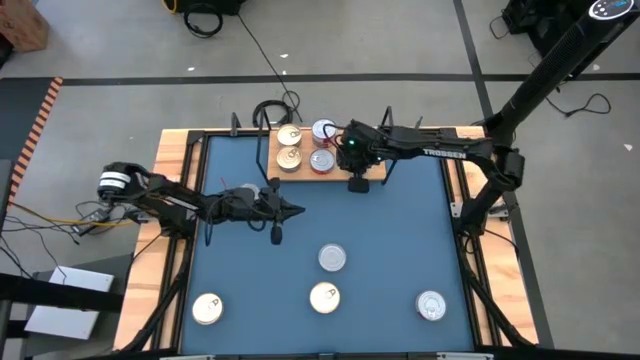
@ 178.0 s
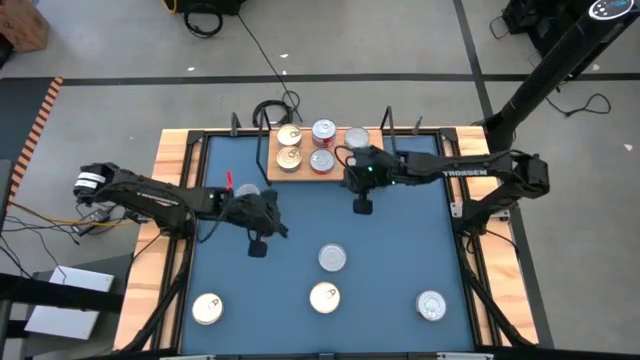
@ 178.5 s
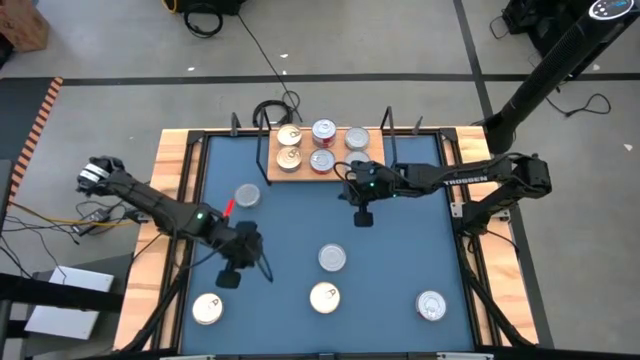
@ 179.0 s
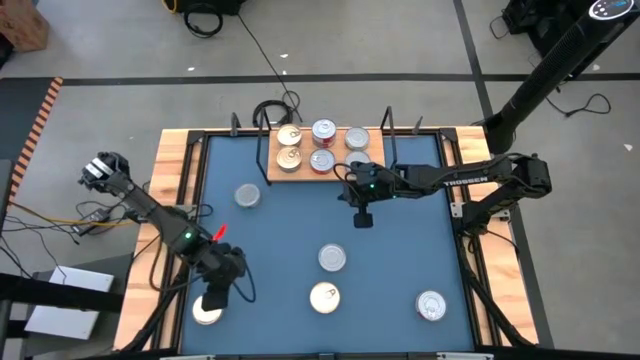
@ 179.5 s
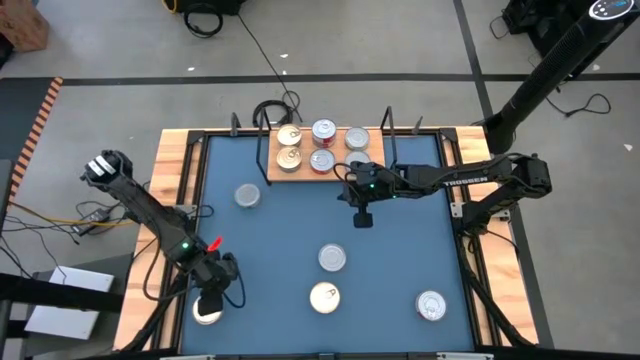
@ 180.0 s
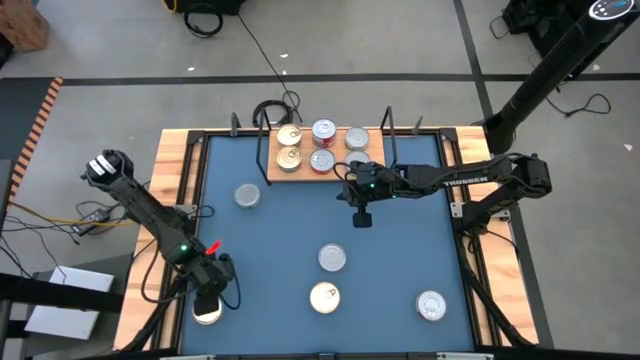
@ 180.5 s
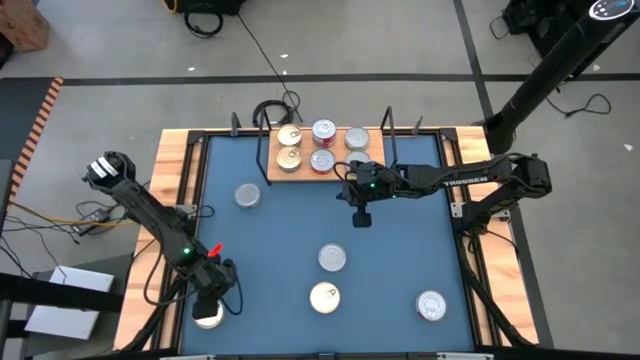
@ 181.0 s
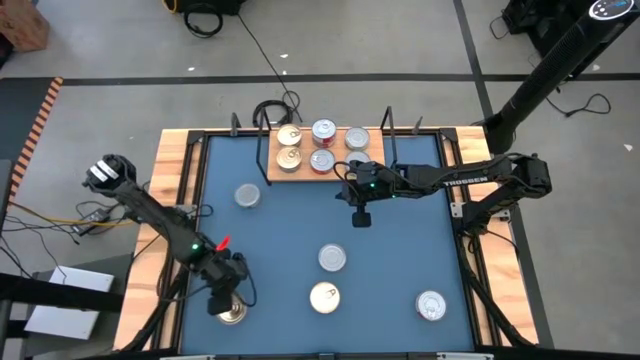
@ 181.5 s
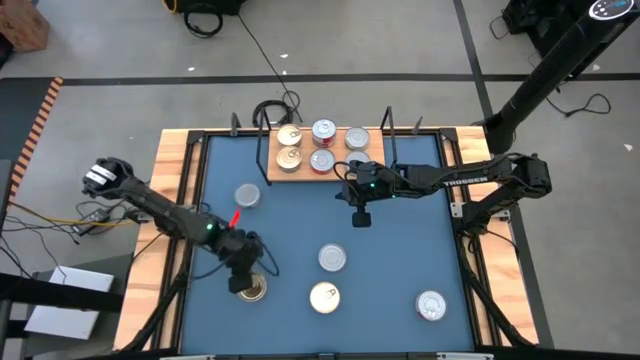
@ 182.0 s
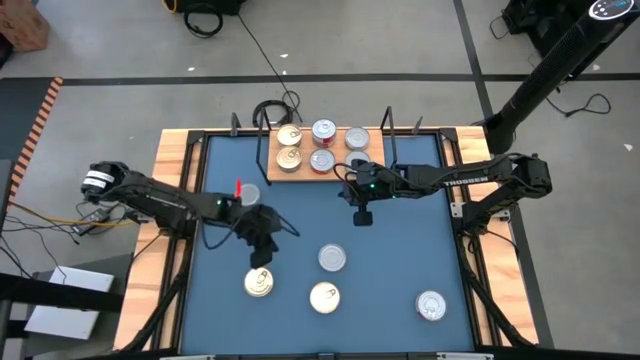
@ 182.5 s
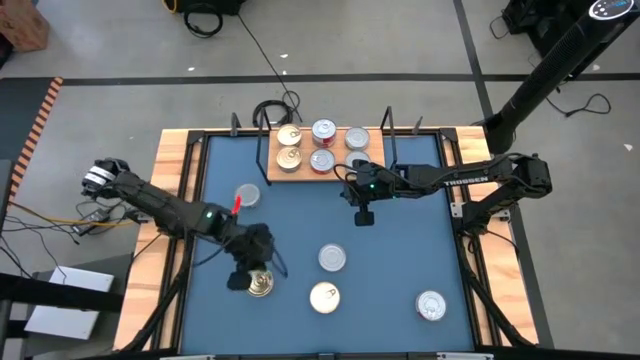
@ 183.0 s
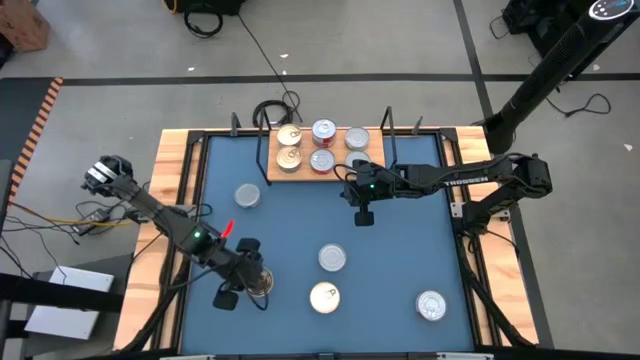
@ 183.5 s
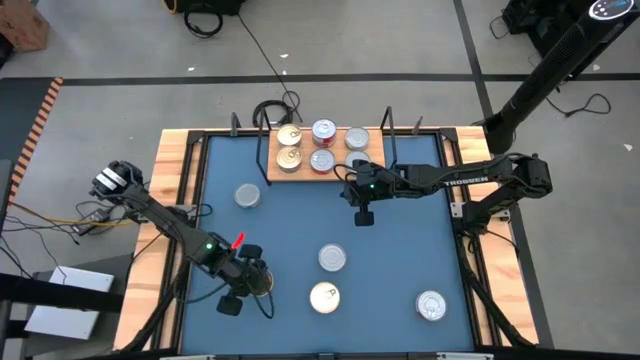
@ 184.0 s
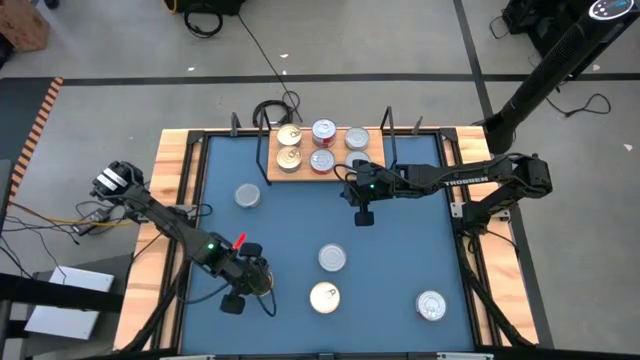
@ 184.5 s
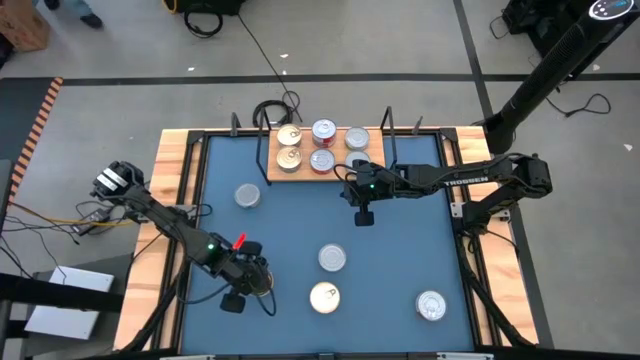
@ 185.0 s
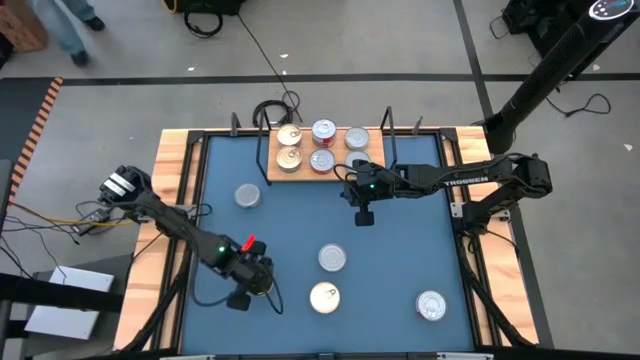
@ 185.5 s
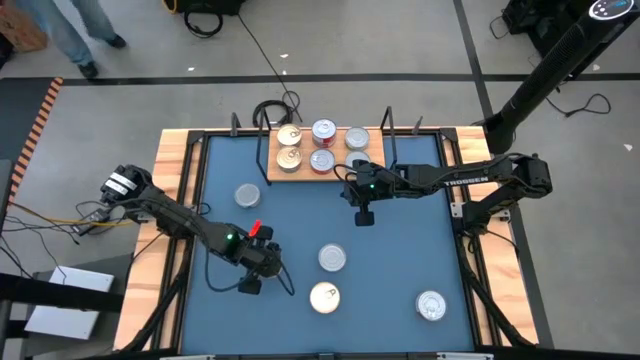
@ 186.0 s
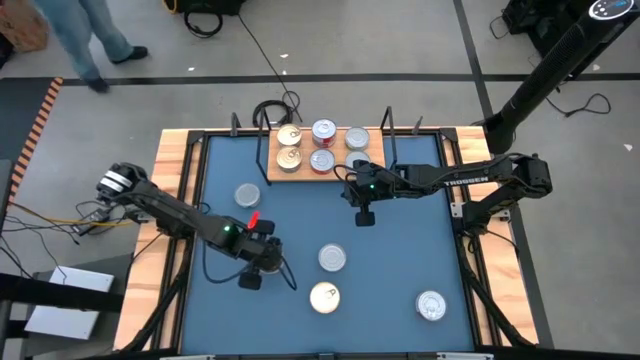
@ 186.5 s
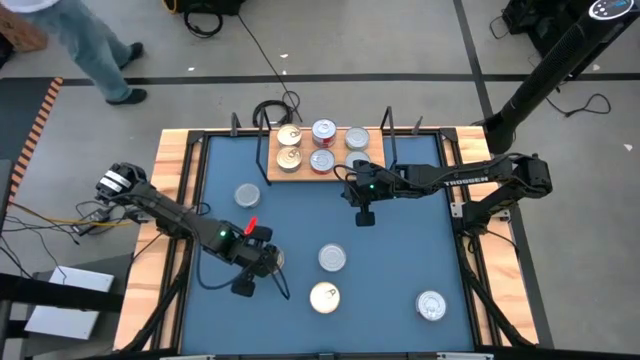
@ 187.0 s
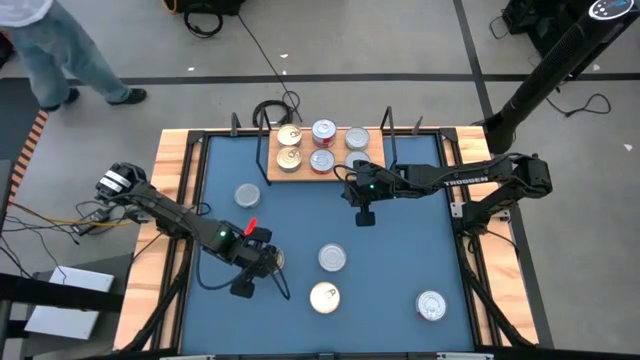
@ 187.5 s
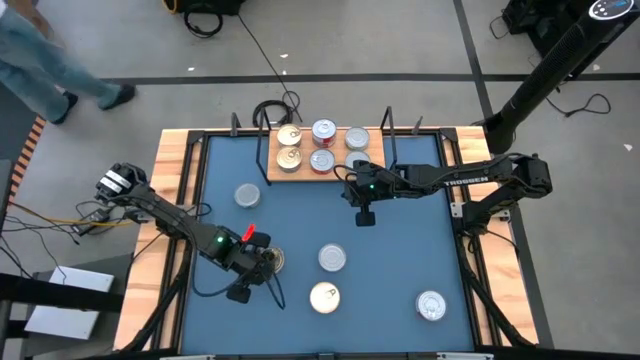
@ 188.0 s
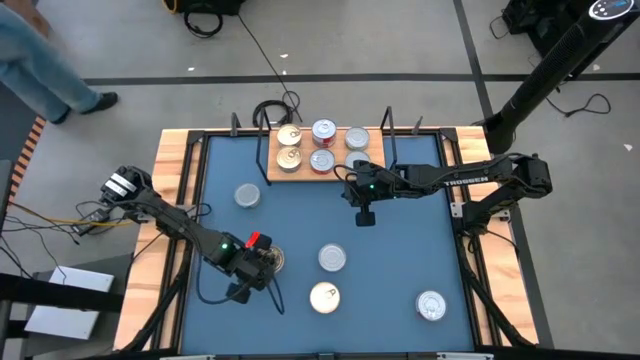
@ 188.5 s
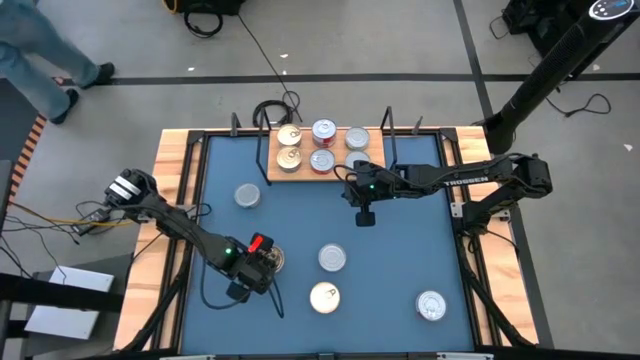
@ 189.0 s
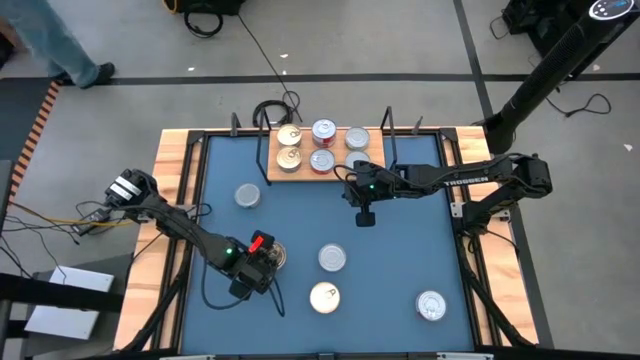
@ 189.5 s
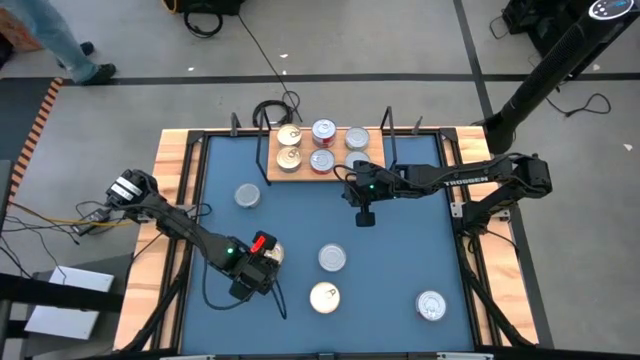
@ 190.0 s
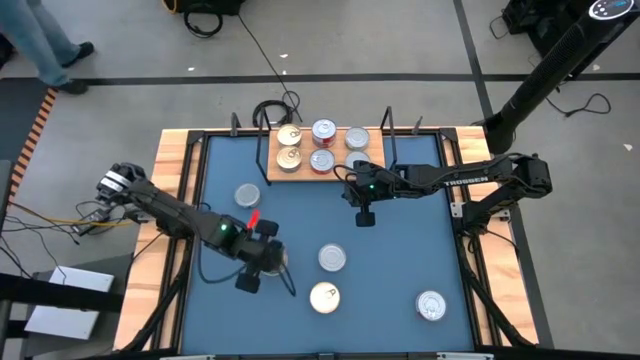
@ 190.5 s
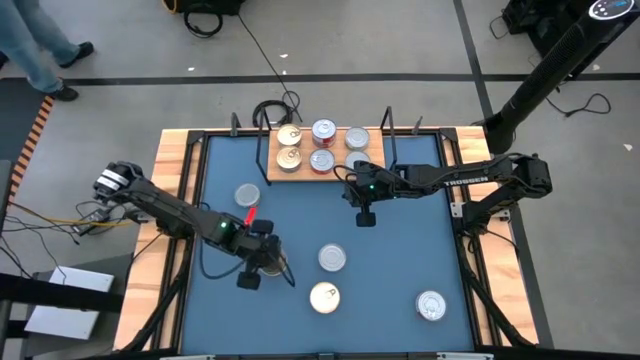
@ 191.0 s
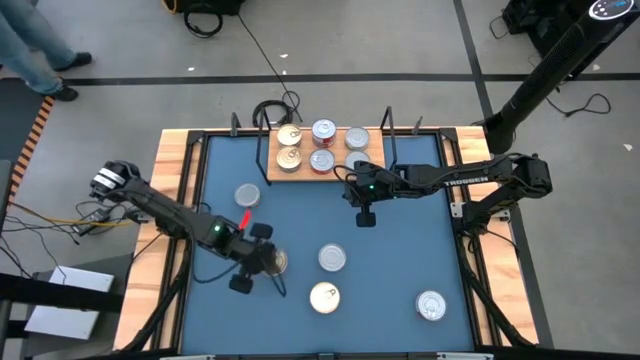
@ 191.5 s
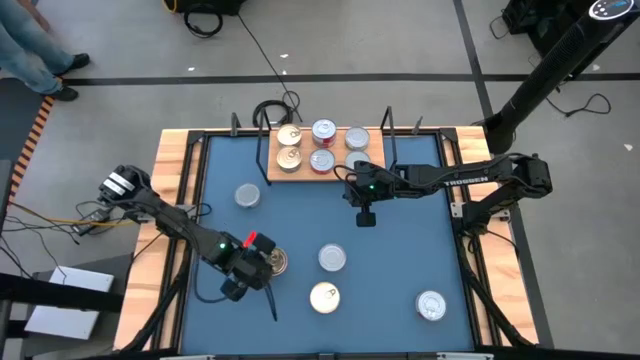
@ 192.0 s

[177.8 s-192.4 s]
Task: Stack canned seafood by type on shelf
Stack the left blue tuna can on the top blue tuna can on the shelf

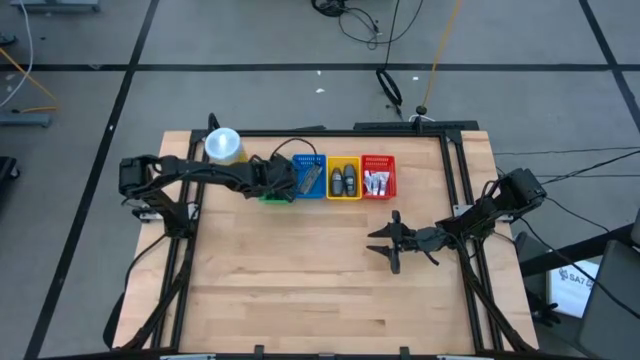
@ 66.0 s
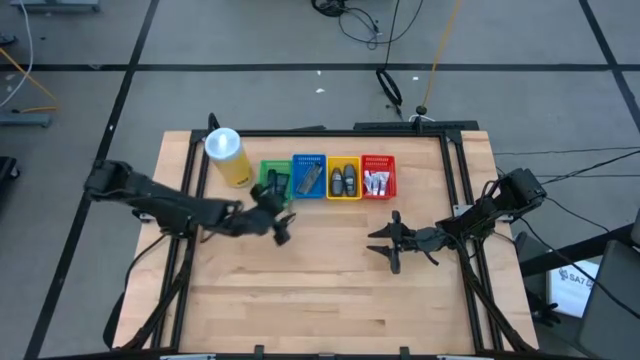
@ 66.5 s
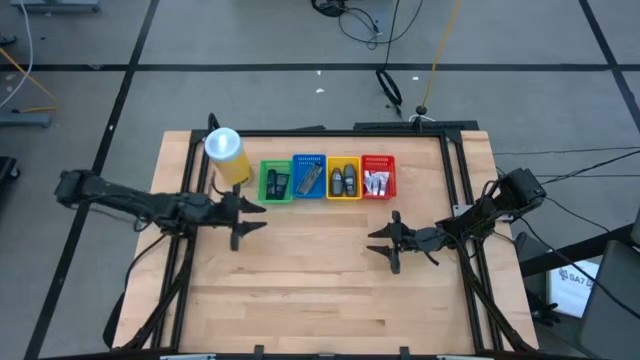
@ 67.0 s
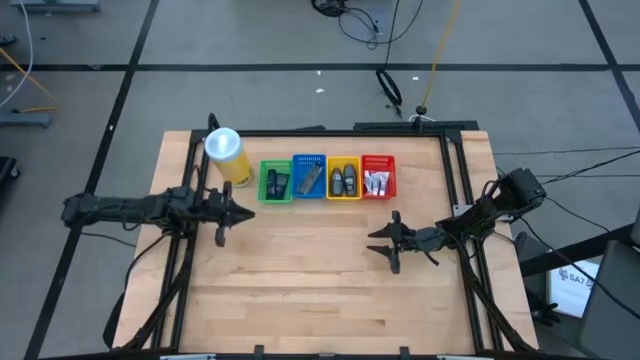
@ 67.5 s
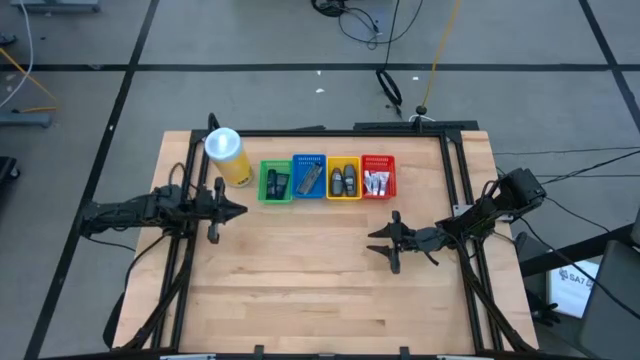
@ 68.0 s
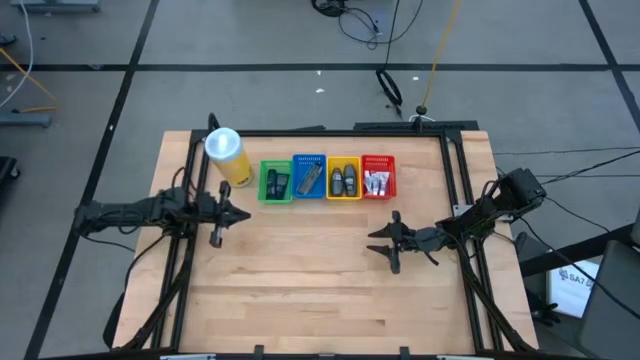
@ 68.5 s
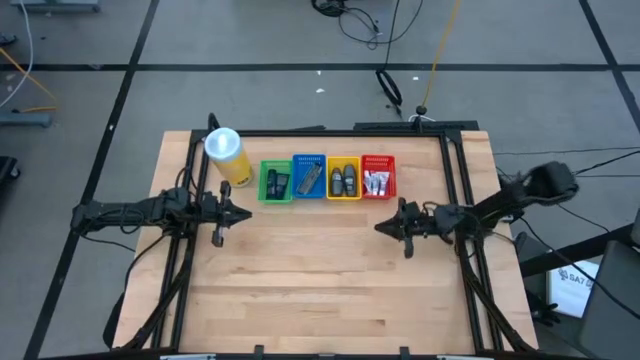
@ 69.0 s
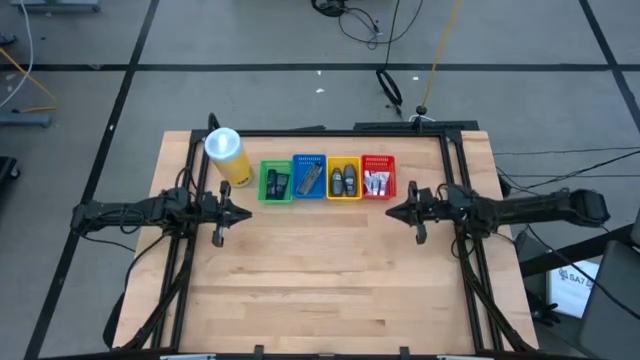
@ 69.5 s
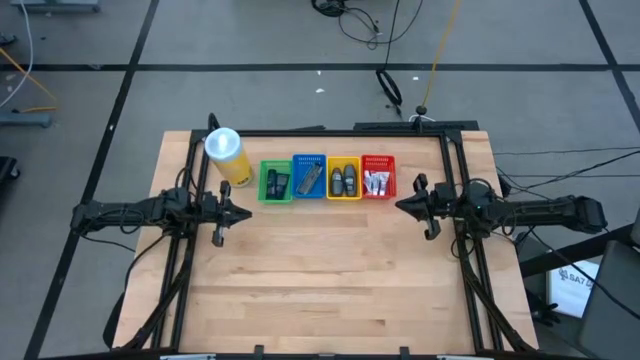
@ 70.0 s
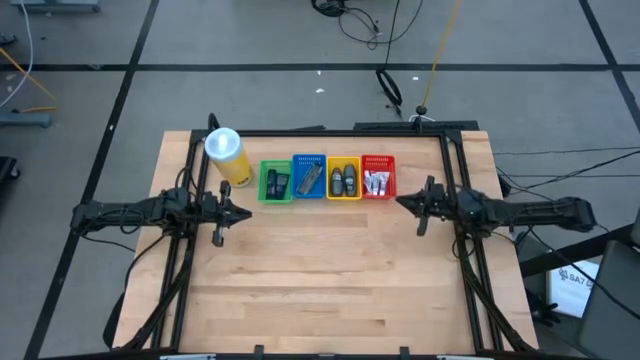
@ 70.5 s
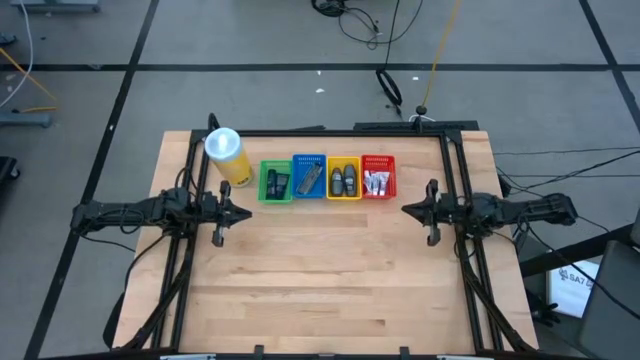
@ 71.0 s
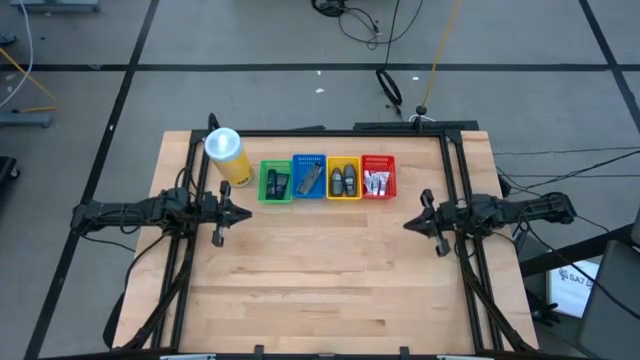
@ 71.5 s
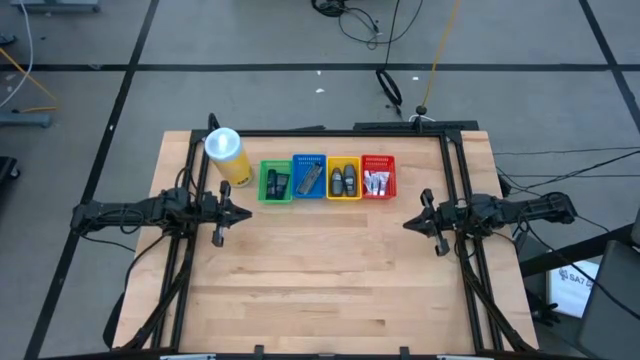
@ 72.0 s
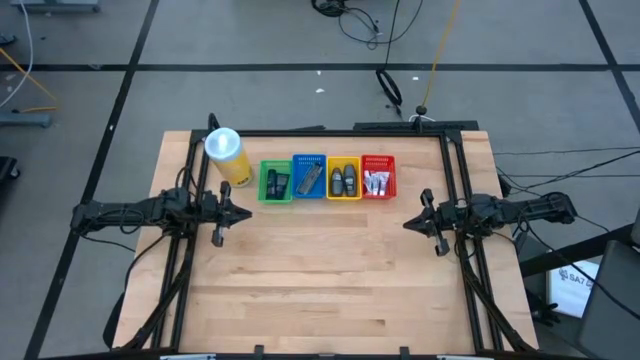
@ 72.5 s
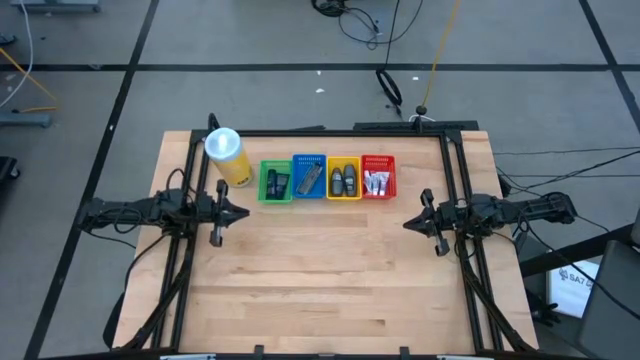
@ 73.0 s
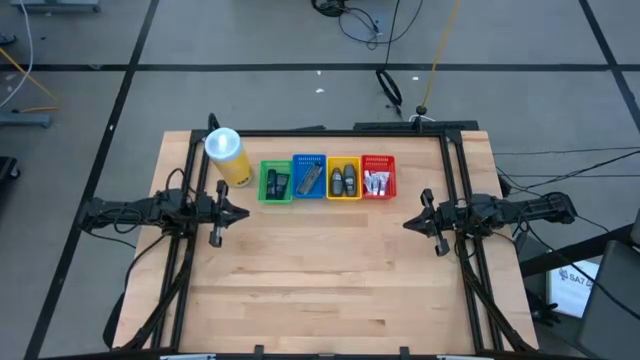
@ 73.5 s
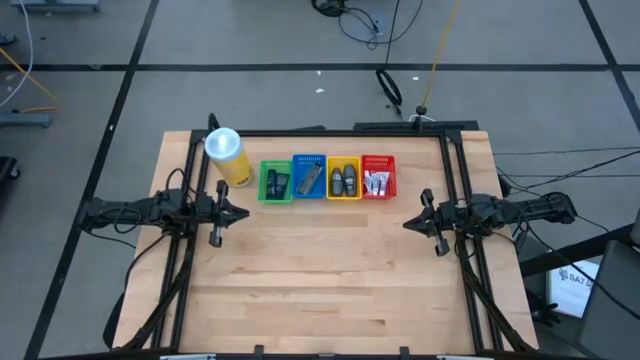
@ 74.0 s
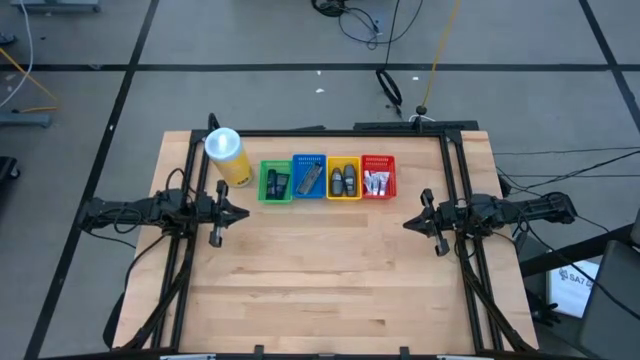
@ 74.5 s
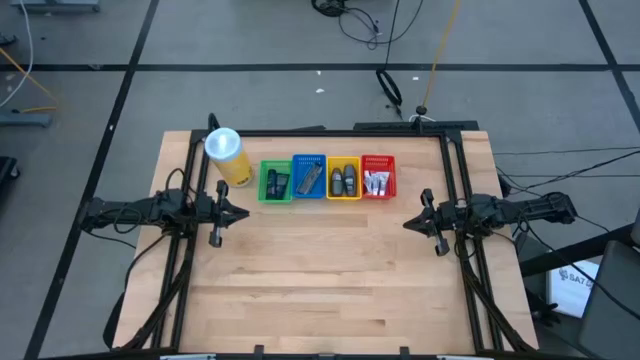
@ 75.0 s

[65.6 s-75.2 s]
Task: Pick & Place Travel size toiletries
Return to home position
